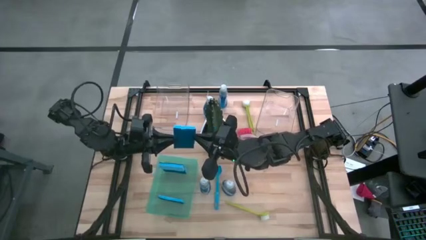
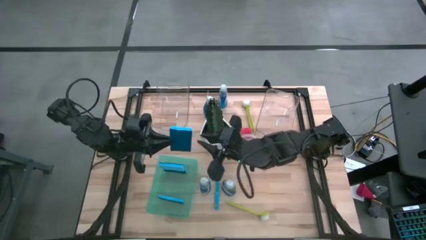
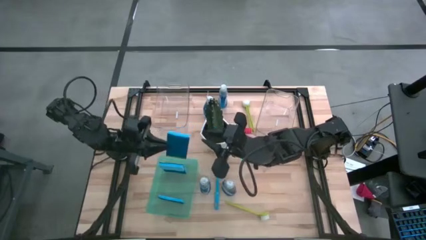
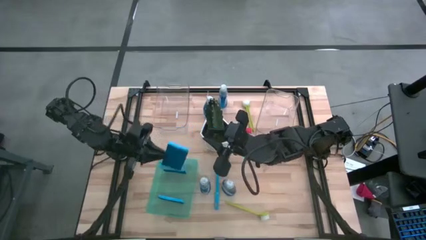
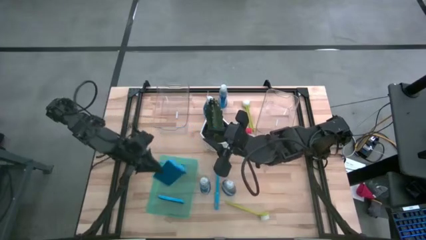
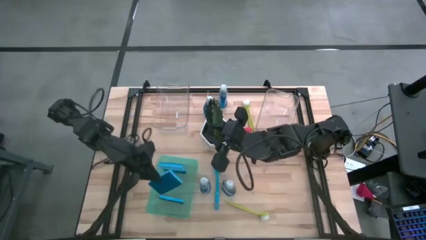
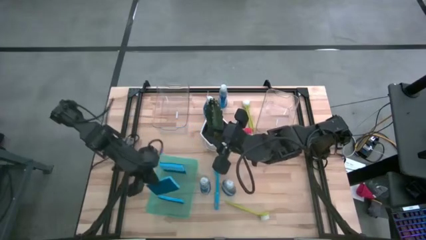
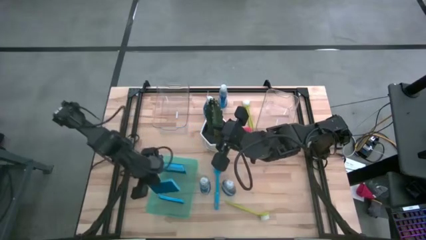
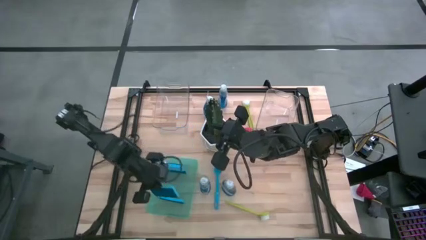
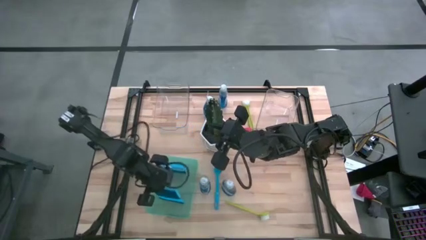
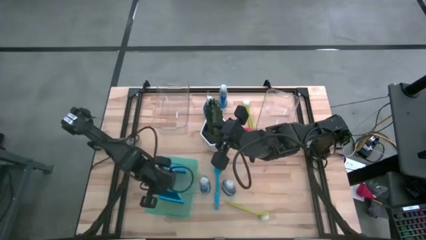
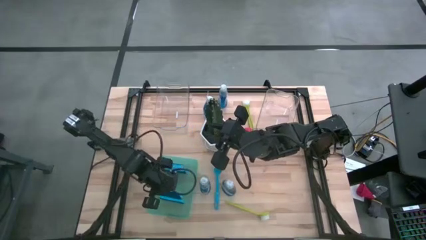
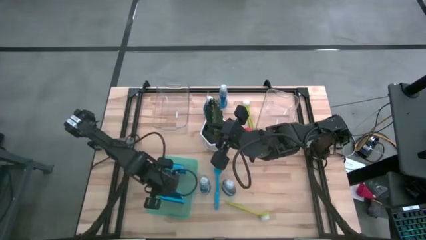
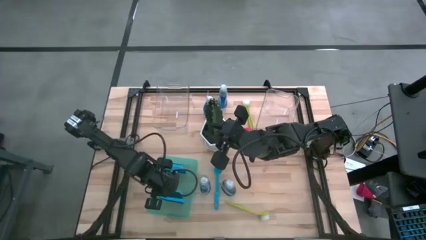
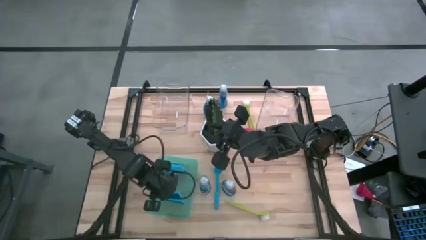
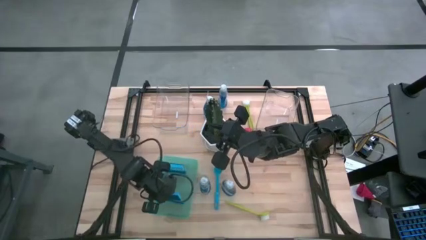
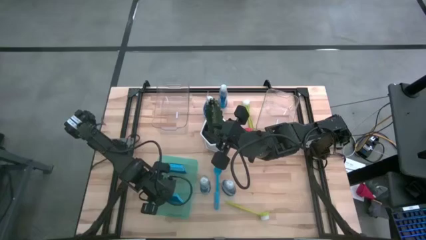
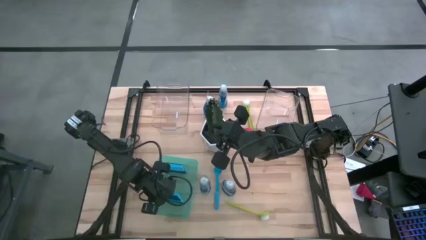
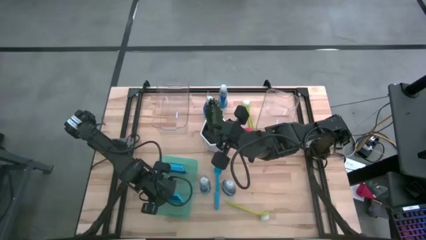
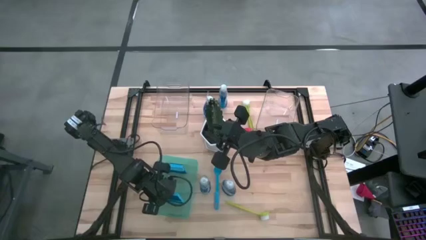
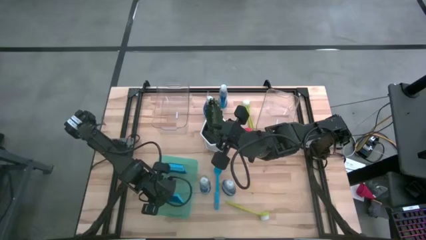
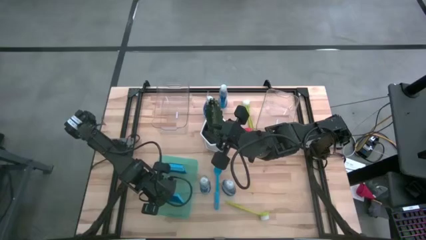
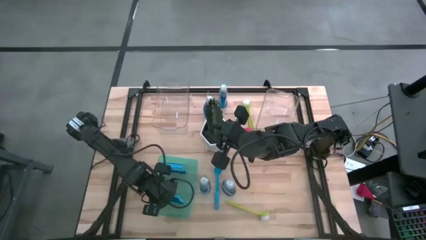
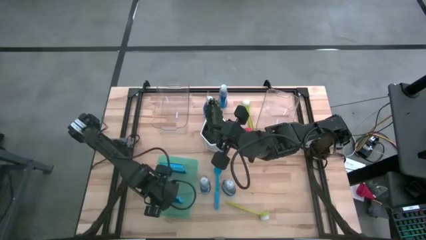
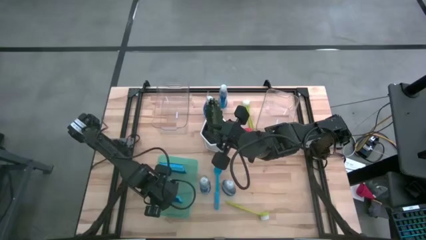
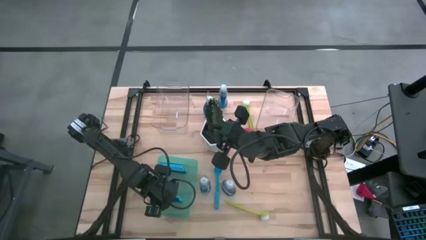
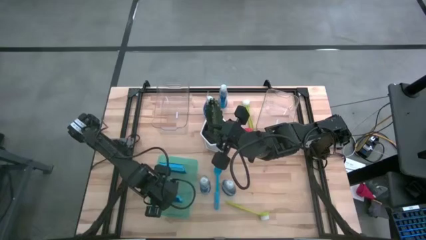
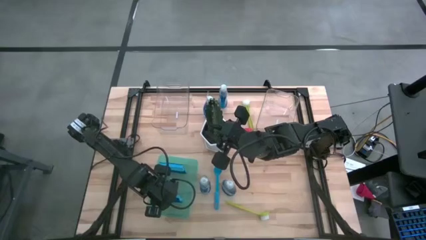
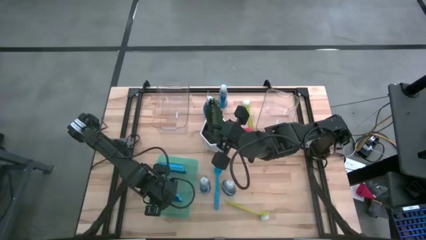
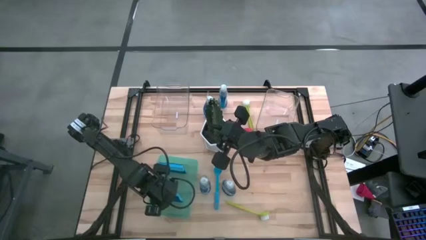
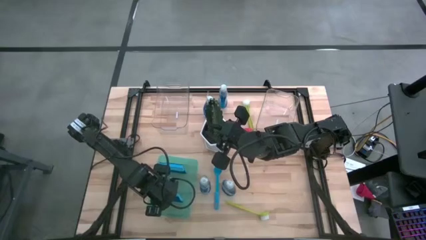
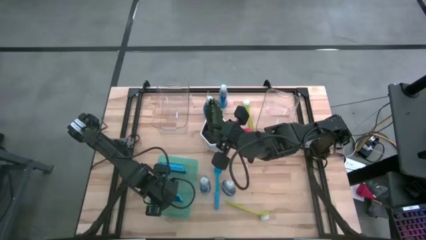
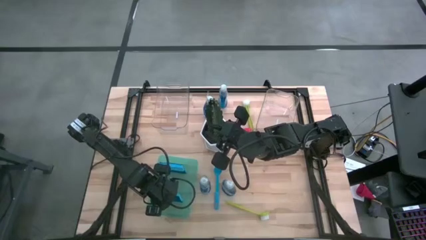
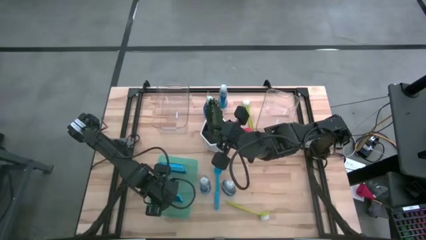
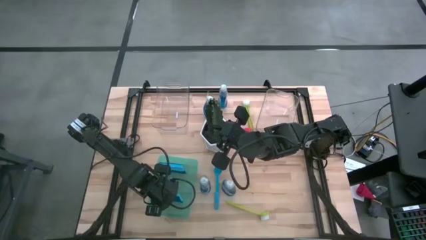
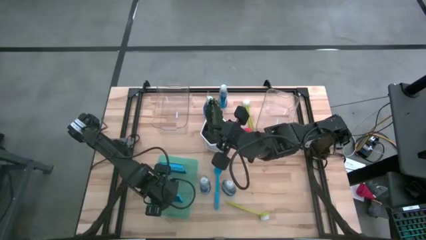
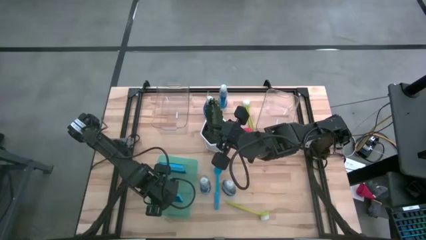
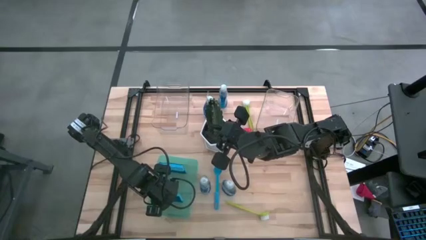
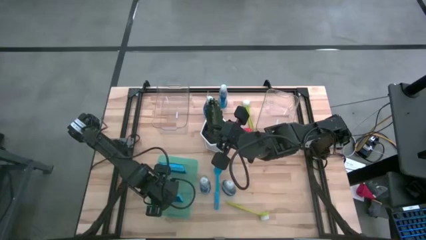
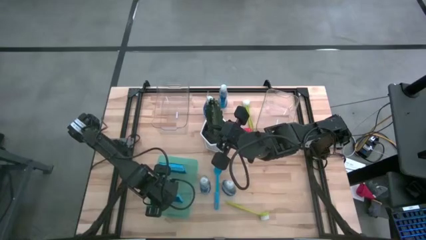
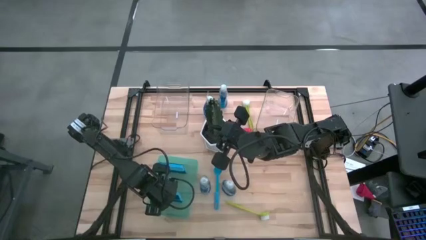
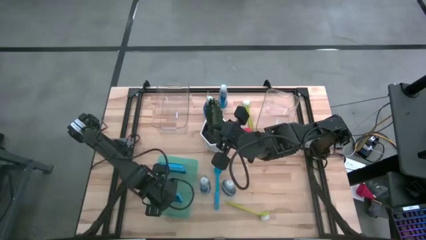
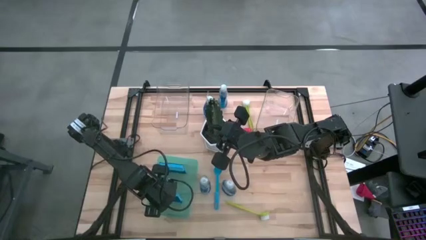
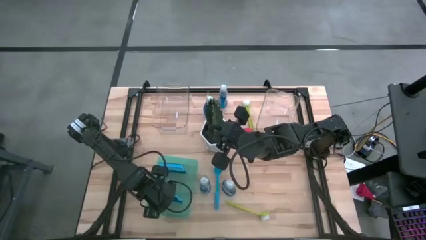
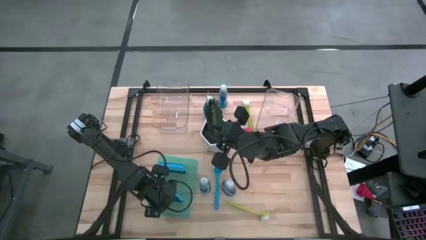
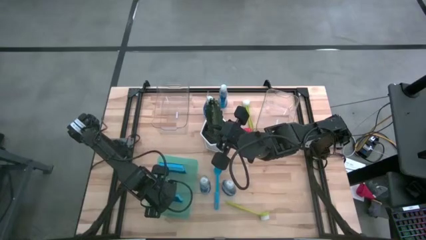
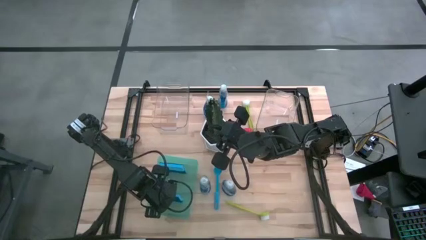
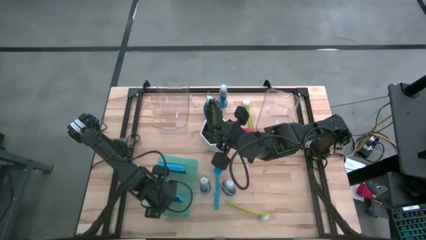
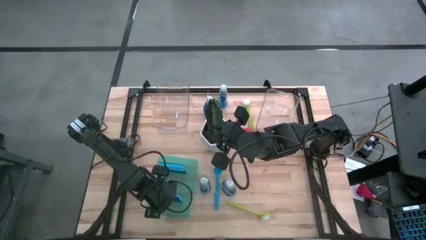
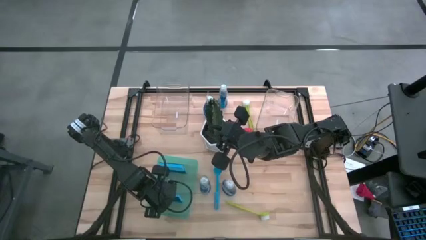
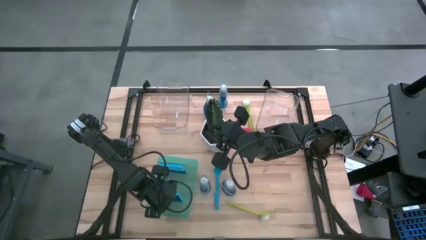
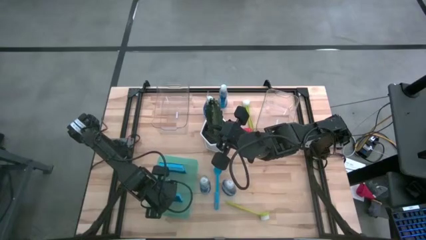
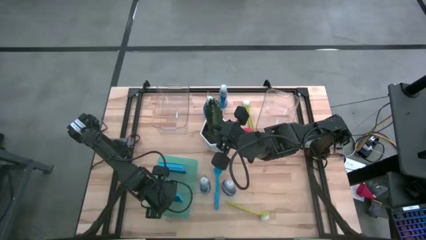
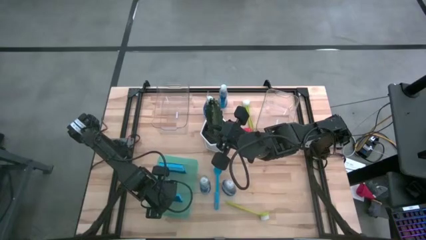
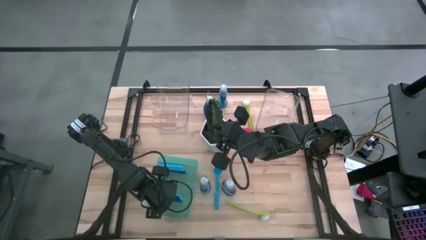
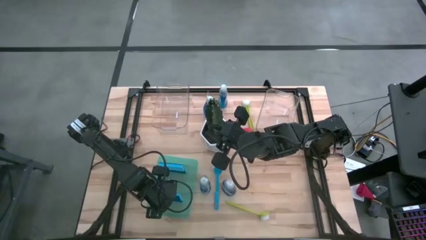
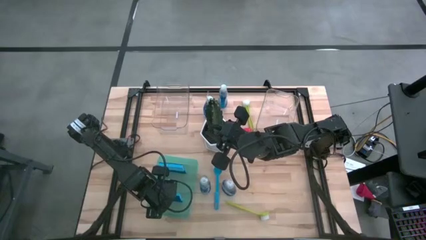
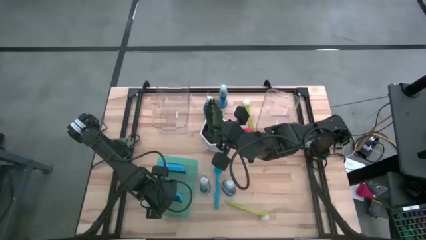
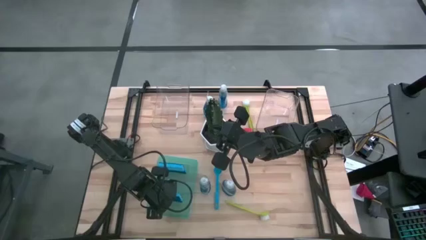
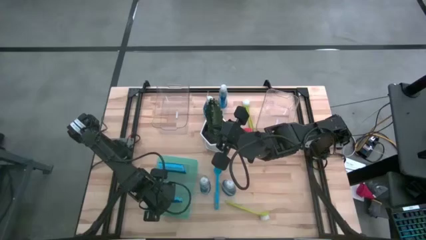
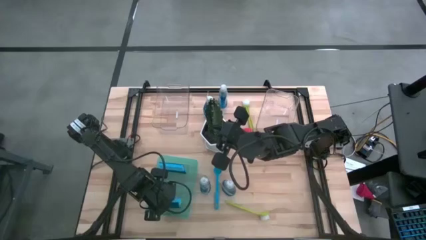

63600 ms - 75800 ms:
Task: Pick & Place Kitchen Sink Supplies
Put the blue sponge wipe into the green bin

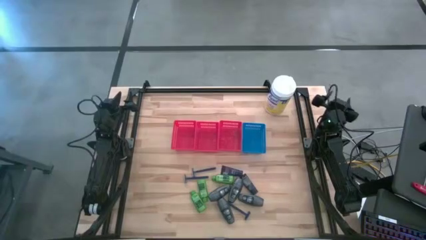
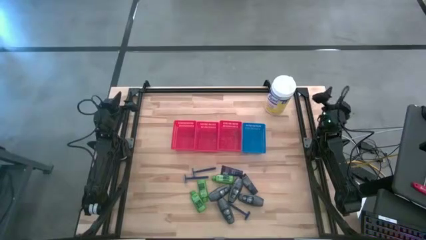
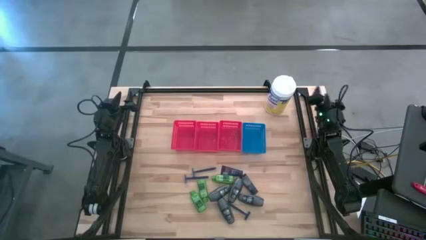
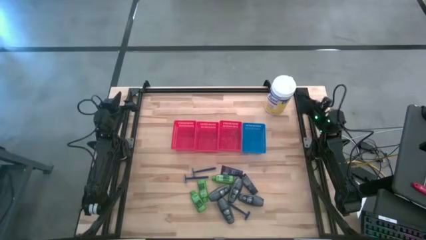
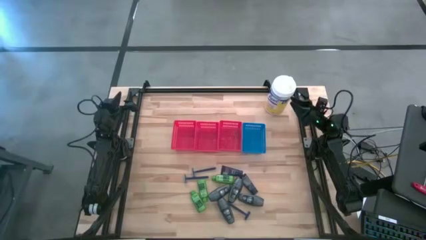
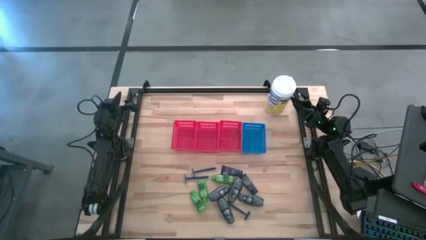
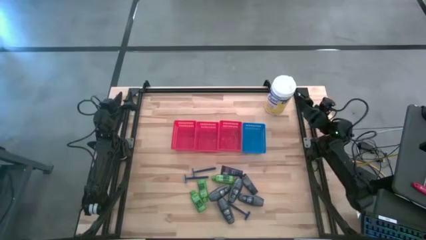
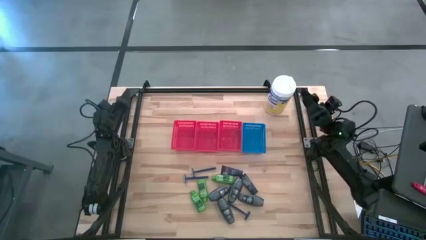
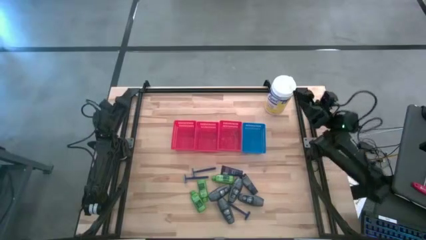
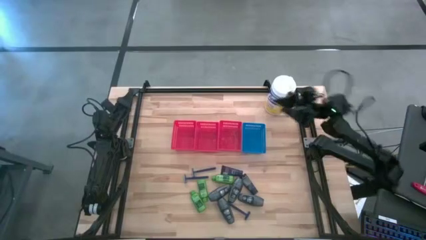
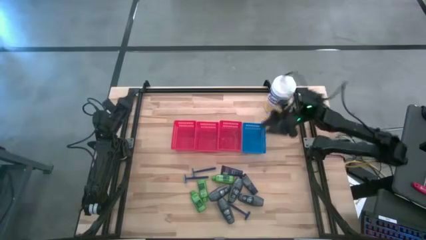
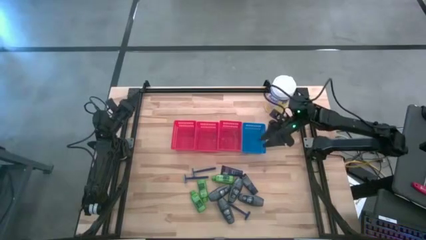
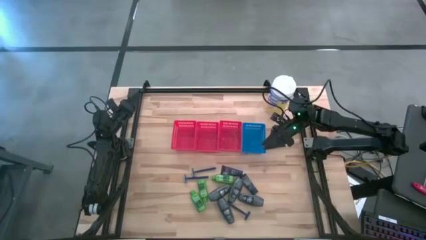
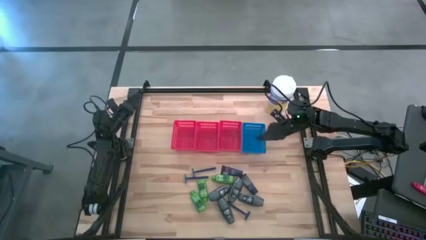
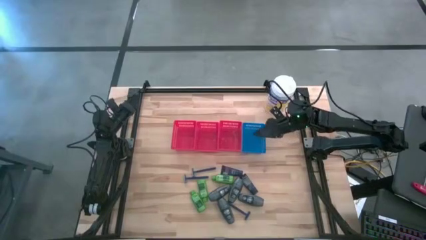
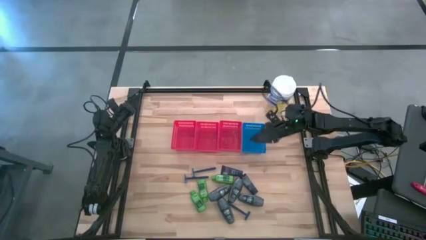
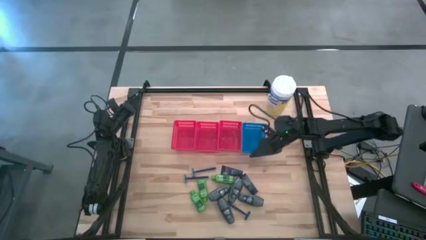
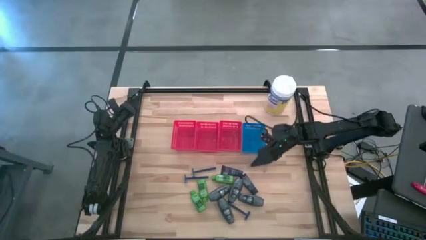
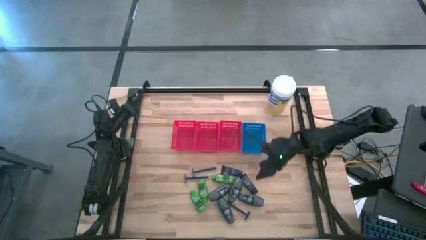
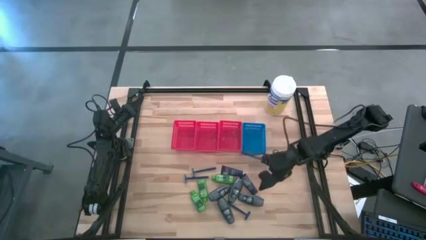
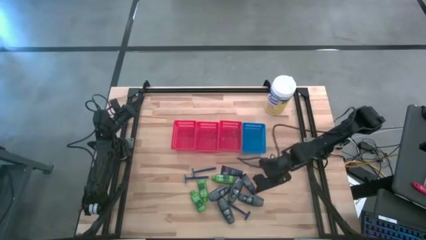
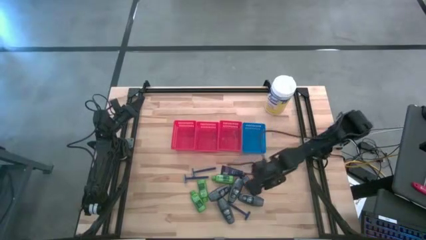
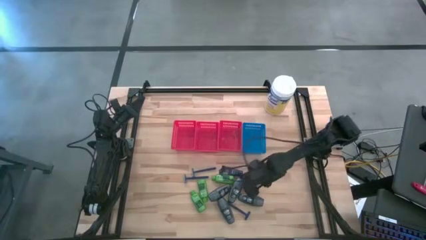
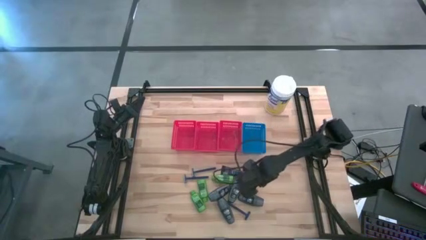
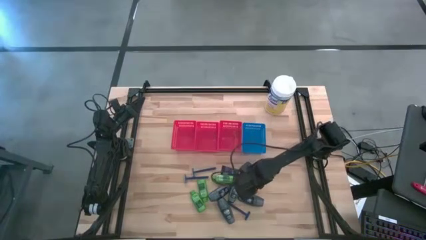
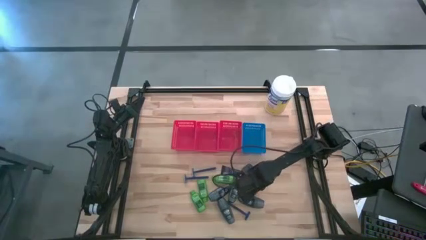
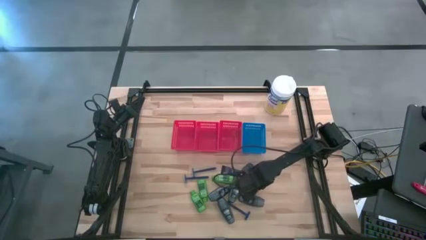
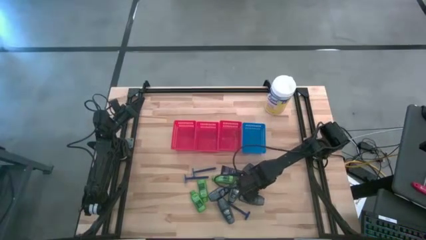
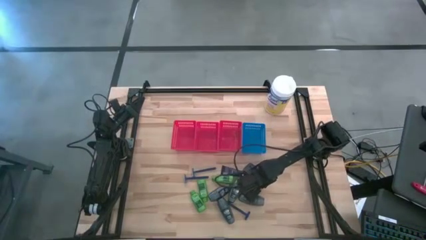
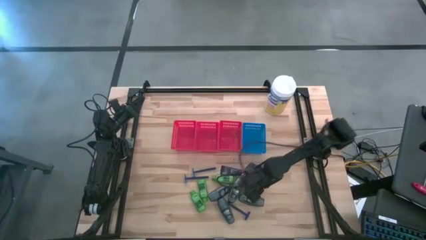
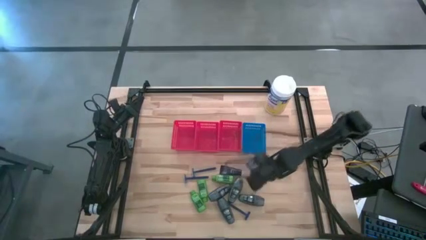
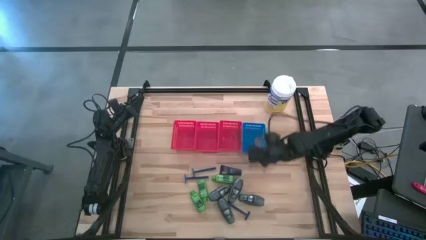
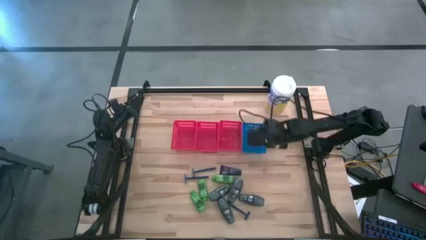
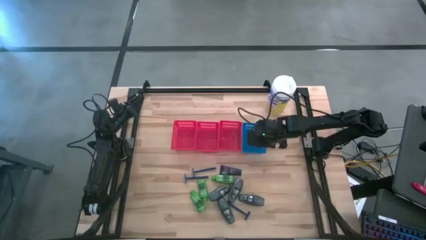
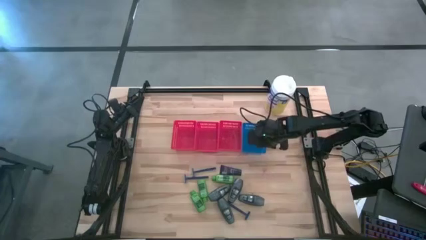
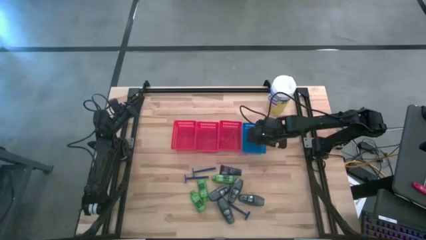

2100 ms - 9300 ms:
Task: Pick & Place Travel size toiletries
Put the dark blue shave cream into the blue bin
